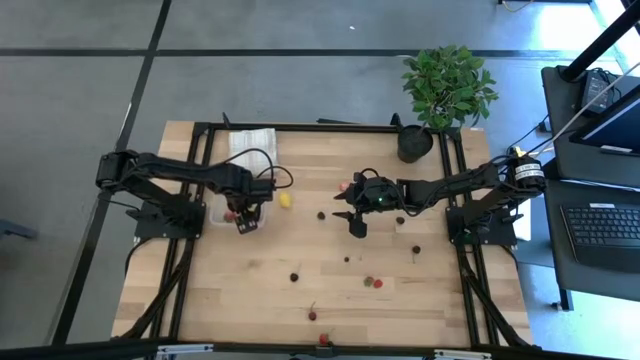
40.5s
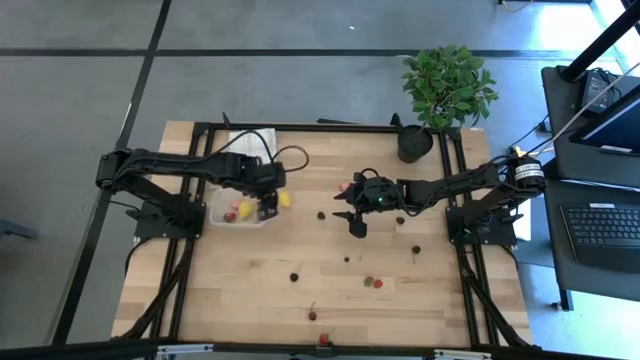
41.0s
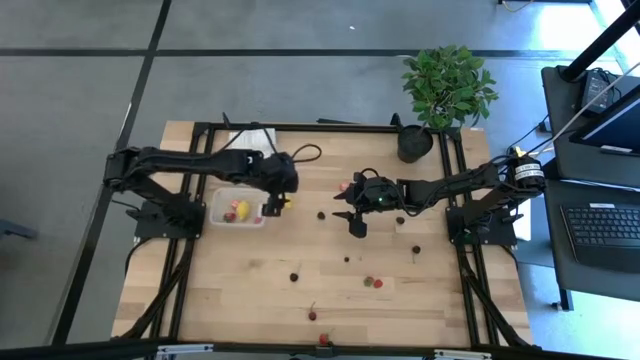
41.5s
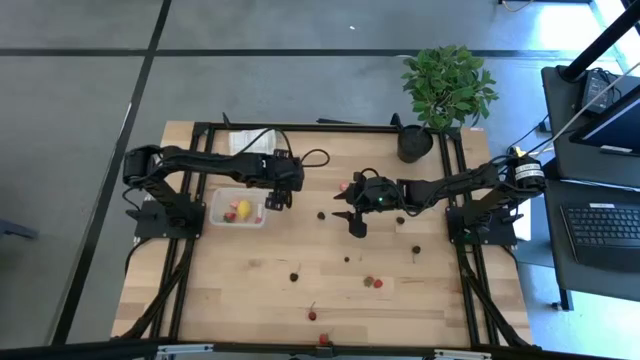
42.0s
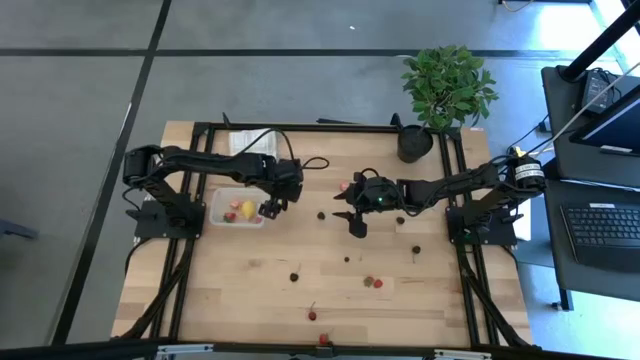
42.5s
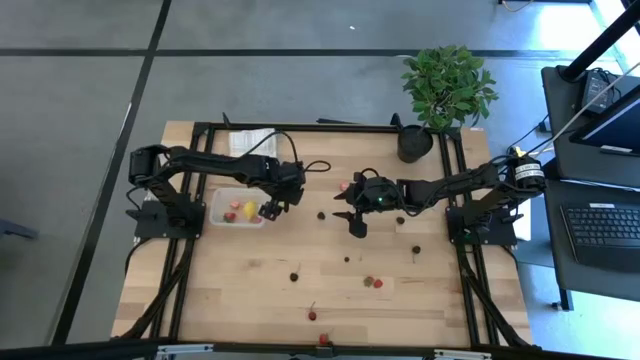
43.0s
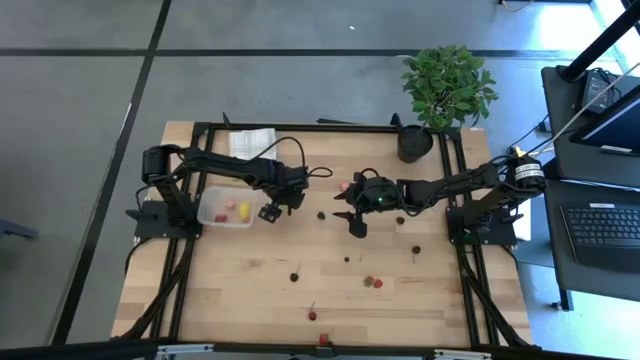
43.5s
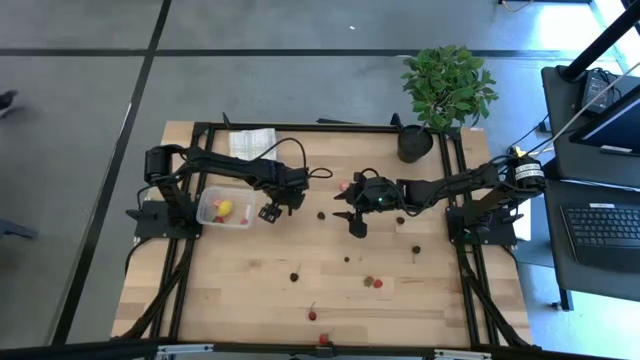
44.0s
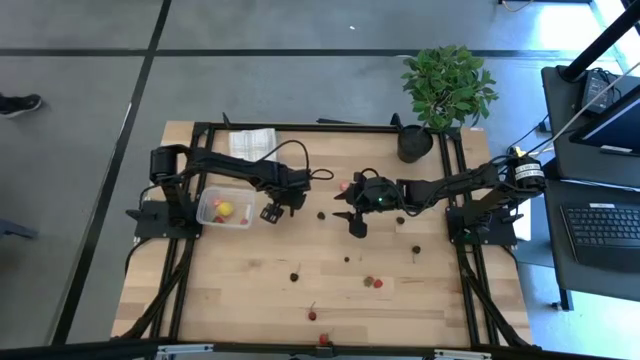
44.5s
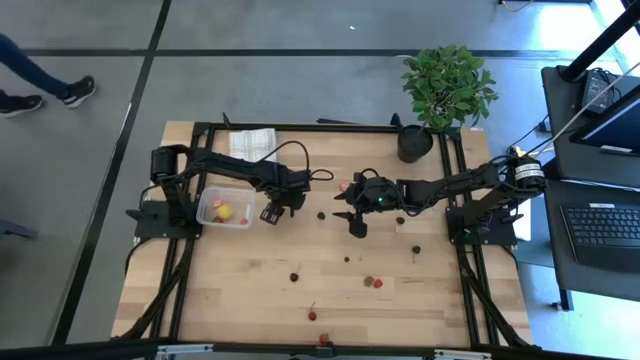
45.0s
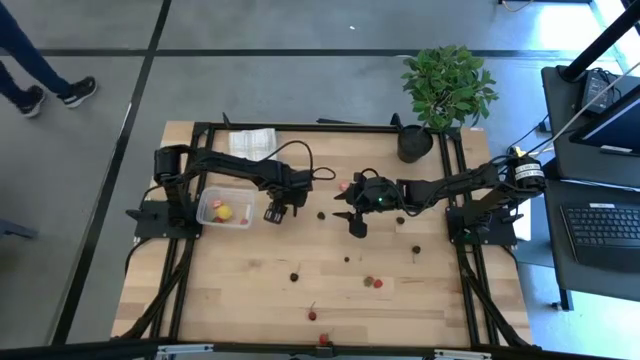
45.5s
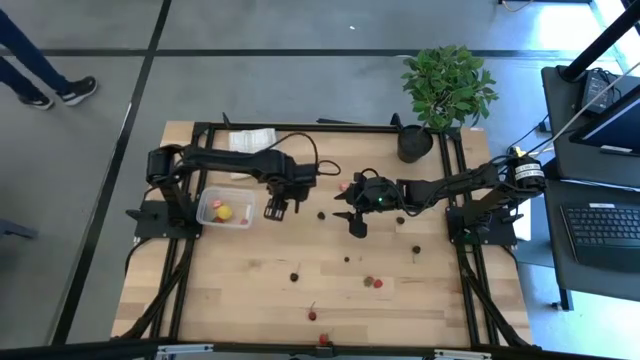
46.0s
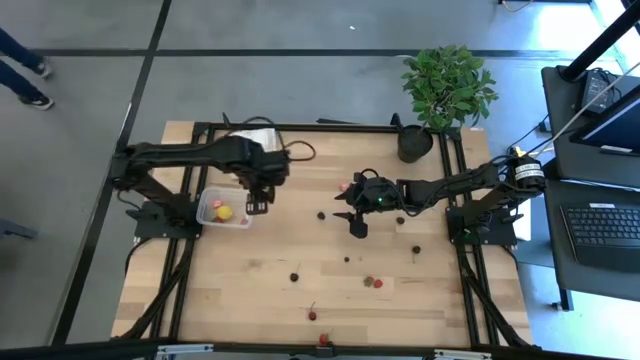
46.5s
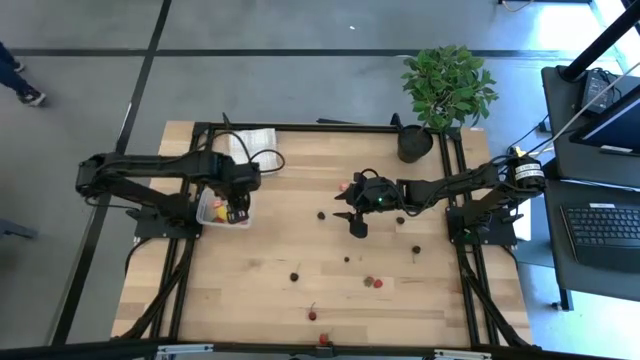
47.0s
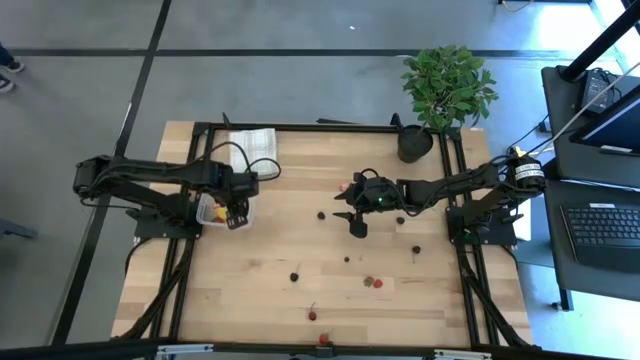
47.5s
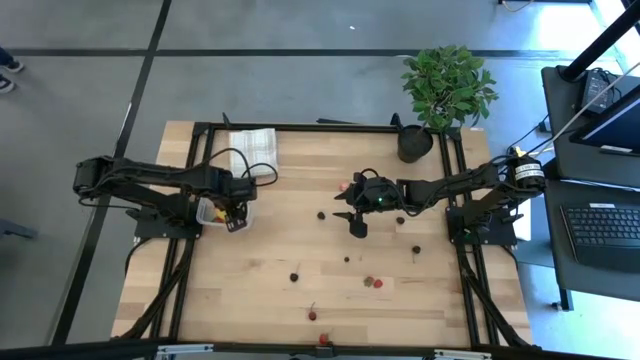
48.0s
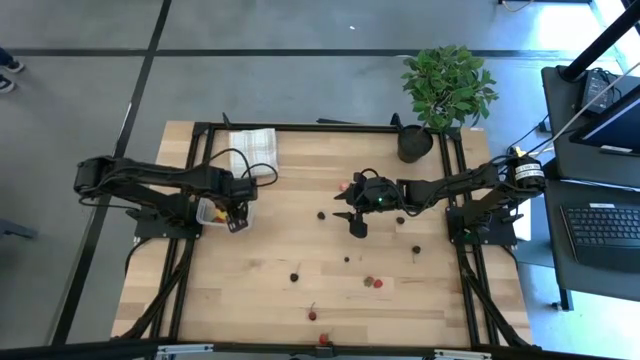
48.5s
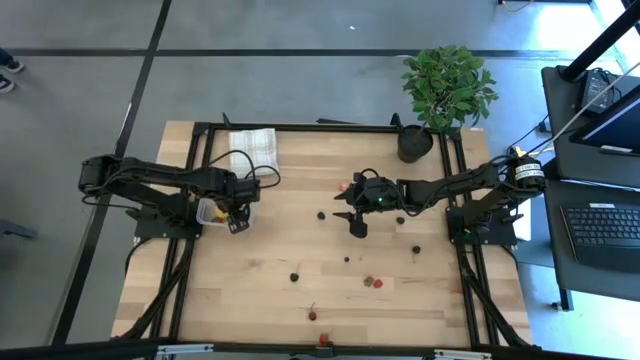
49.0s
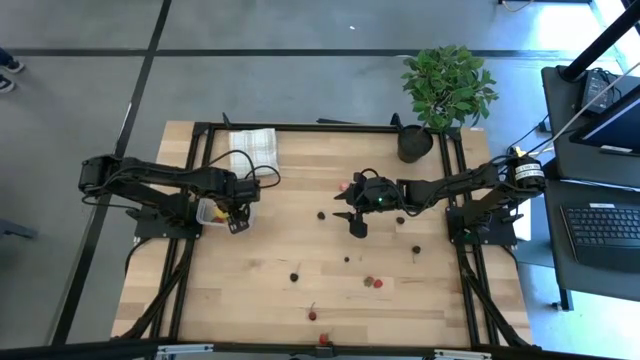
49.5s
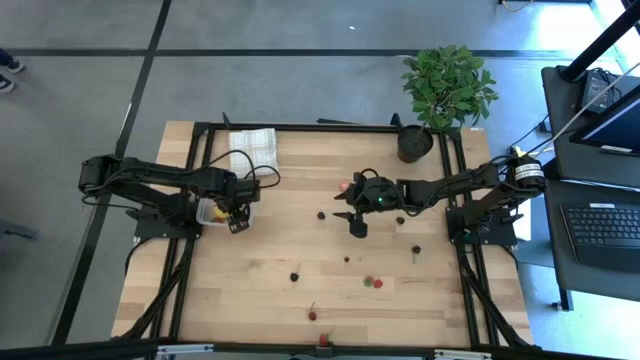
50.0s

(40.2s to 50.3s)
Task: Pick and placing Produce into tupperware
Put the yellow lemon into the transparent bin

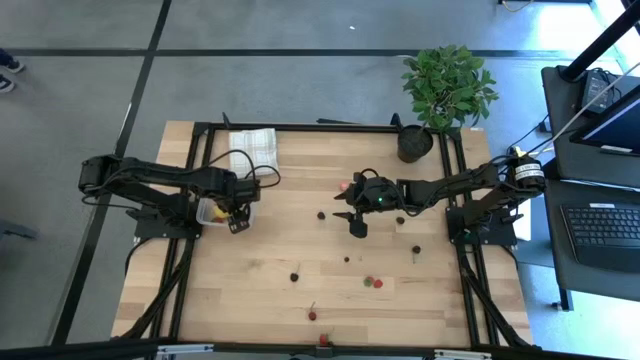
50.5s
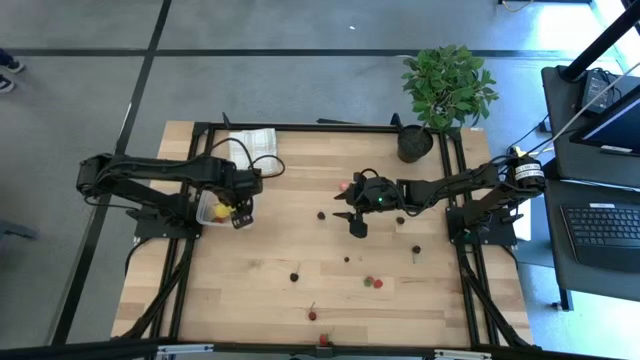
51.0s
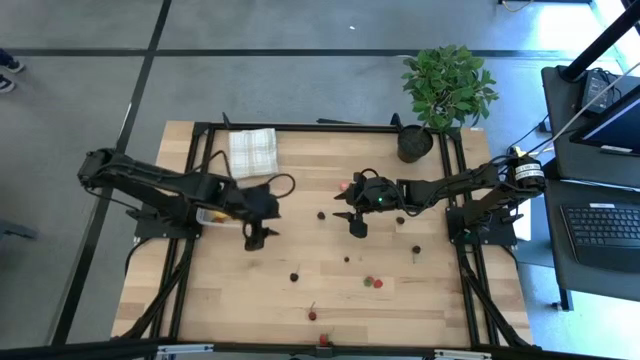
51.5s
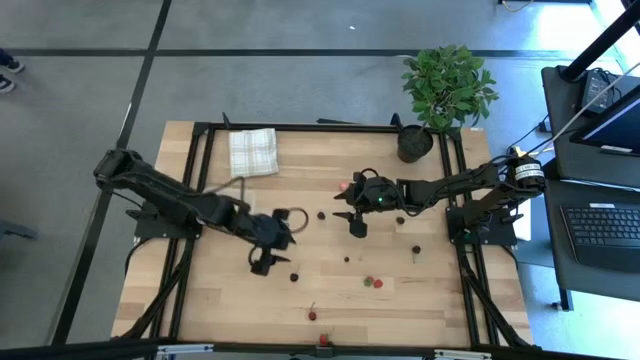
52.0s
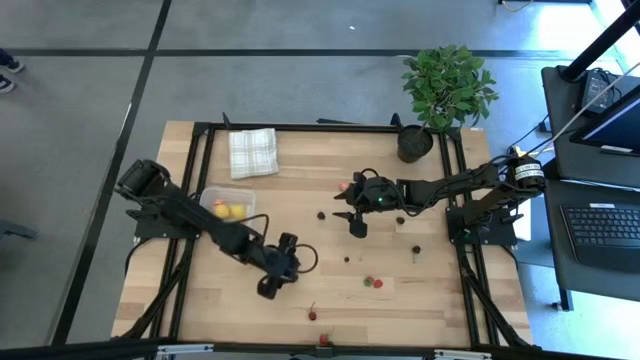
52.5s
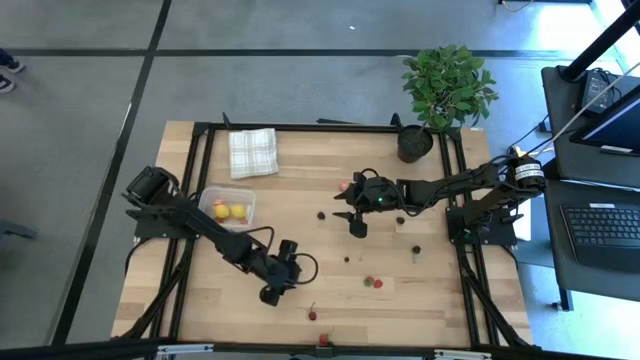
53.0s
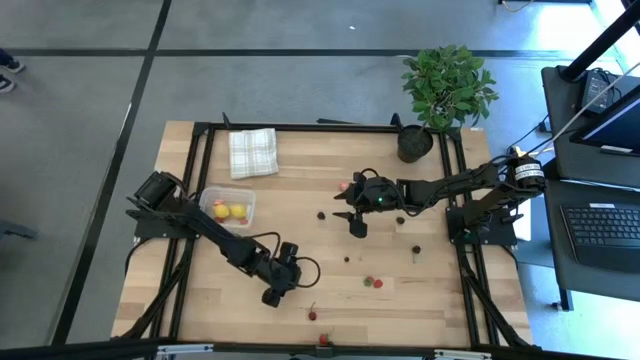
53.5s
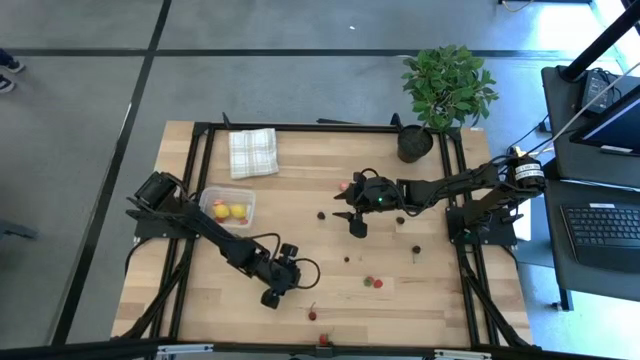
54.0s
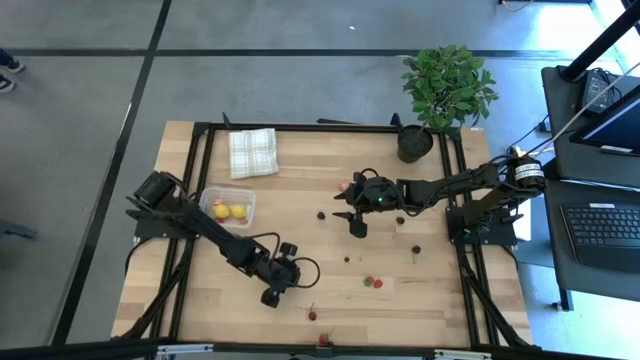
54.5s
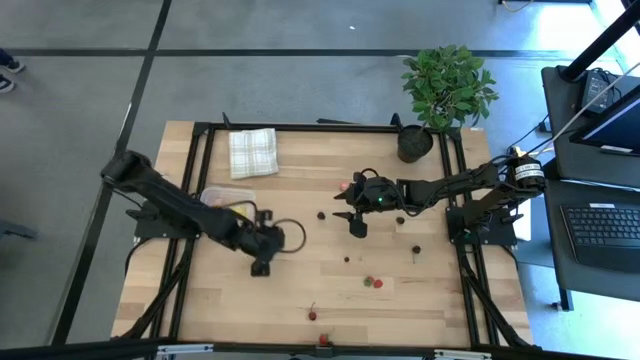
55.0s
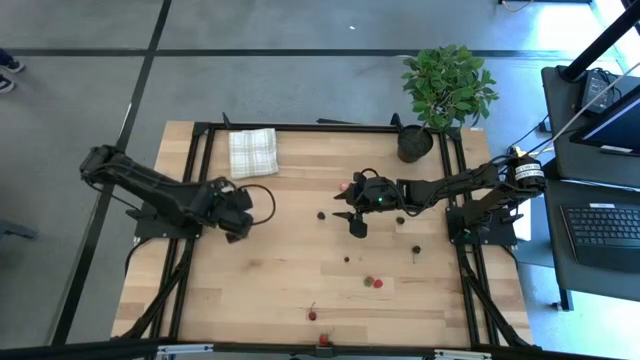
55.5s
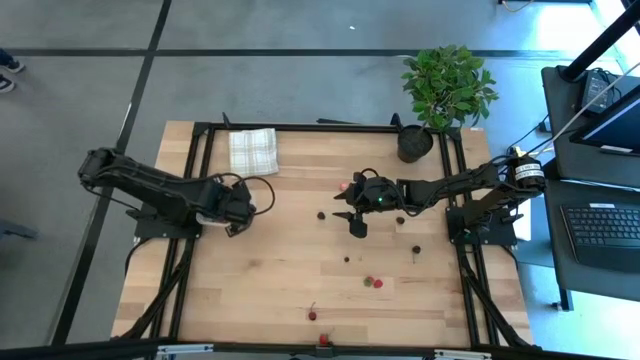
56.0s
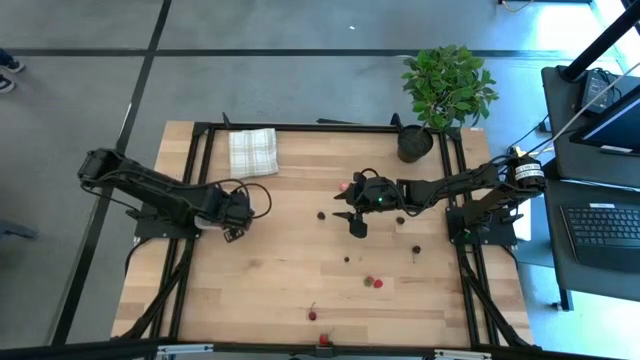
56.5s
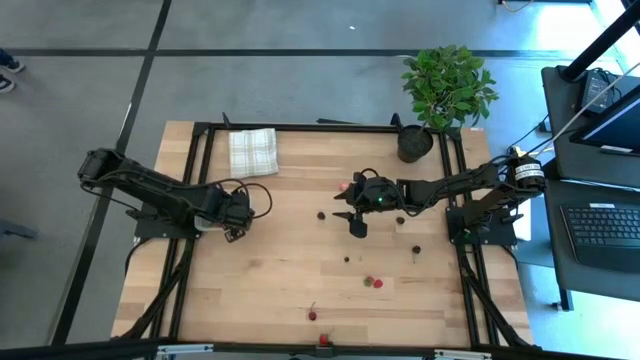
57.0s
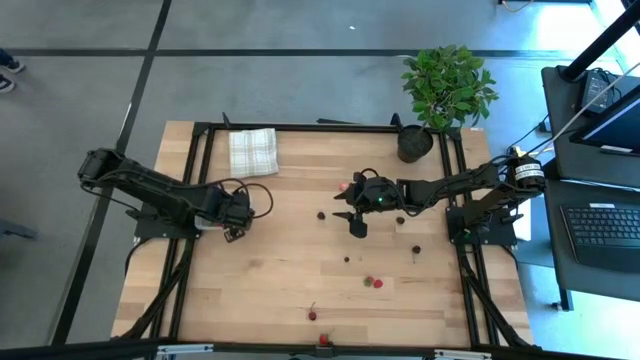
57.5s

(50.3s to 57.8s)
Put the left black cherry into the transparent bin

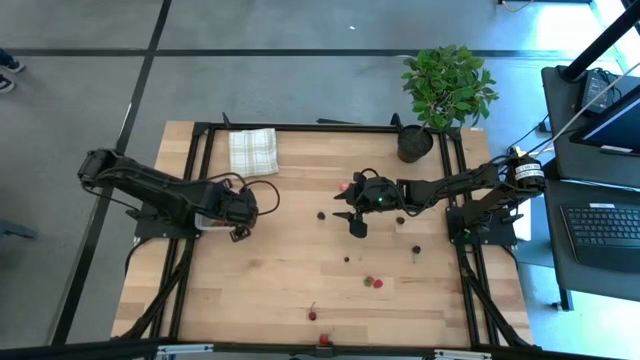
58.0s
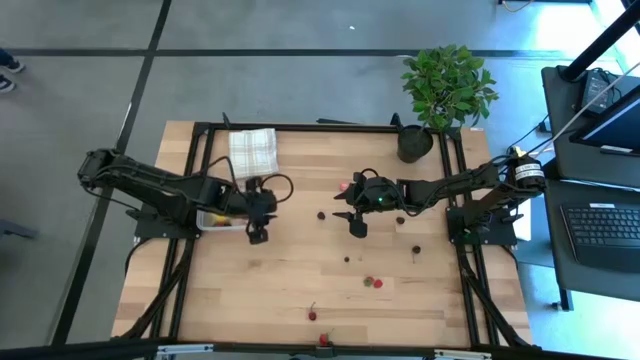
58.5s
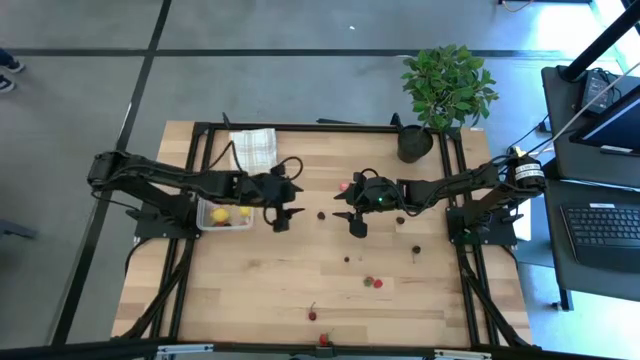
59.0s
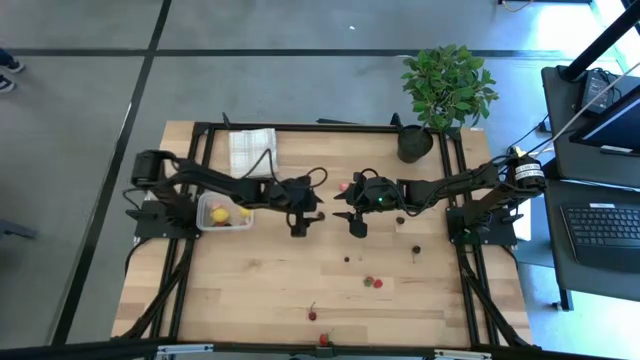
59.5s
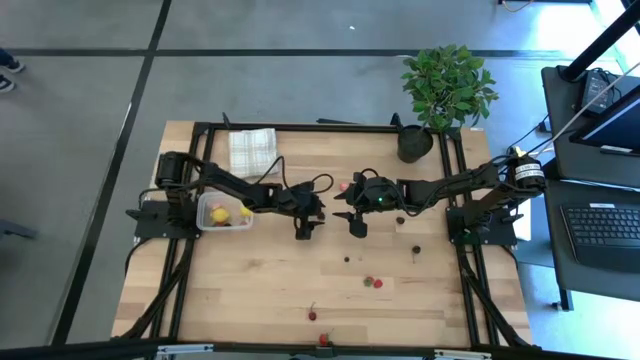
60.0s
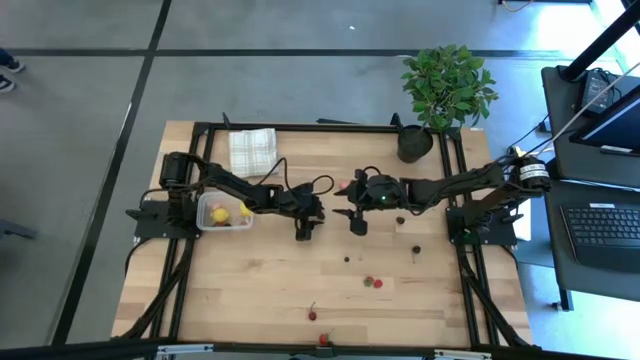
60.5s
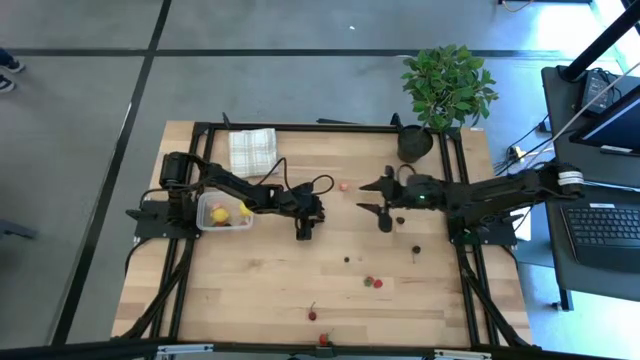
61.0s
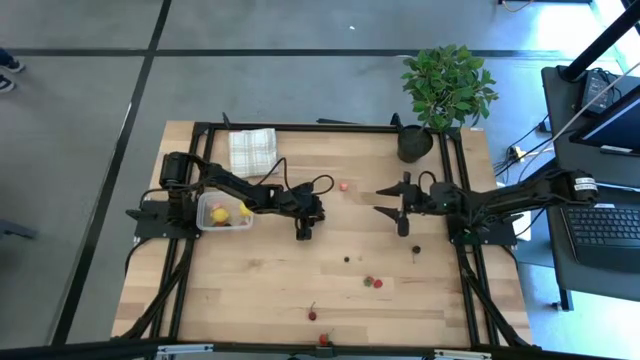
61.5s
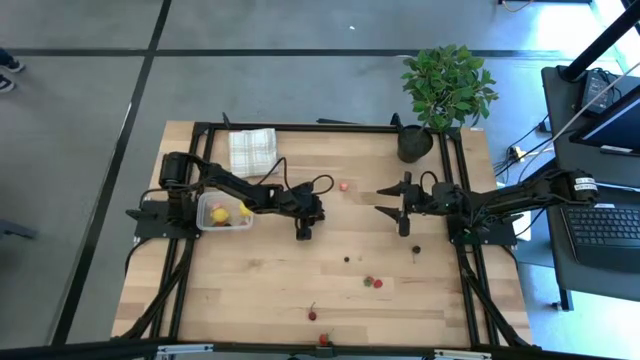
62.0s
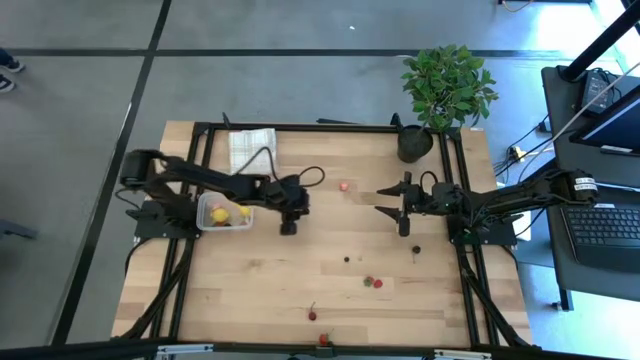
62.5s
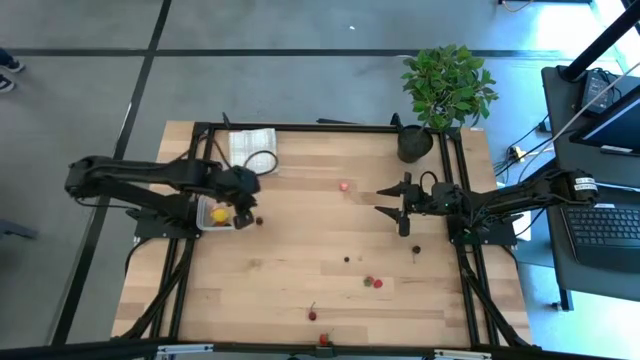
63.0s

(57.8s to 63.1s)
Put the left black berry into the transparent bin
